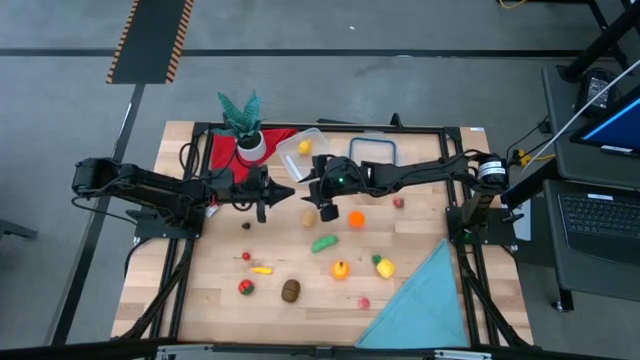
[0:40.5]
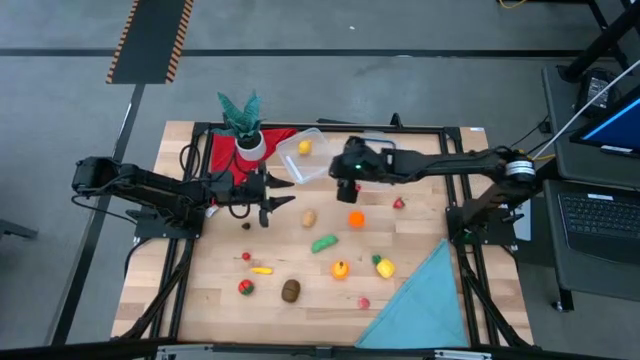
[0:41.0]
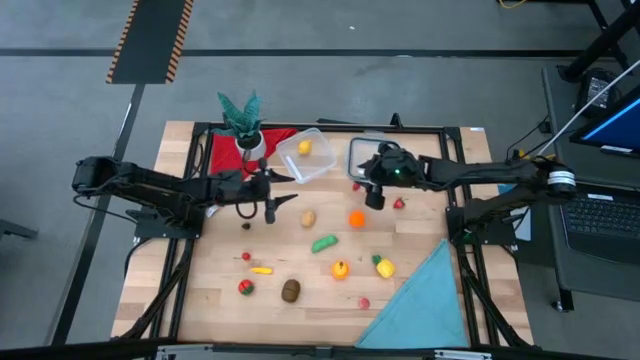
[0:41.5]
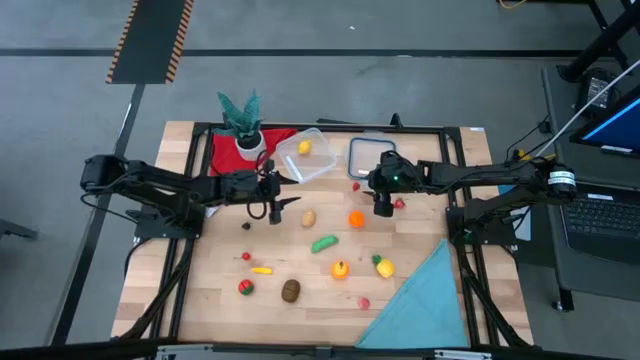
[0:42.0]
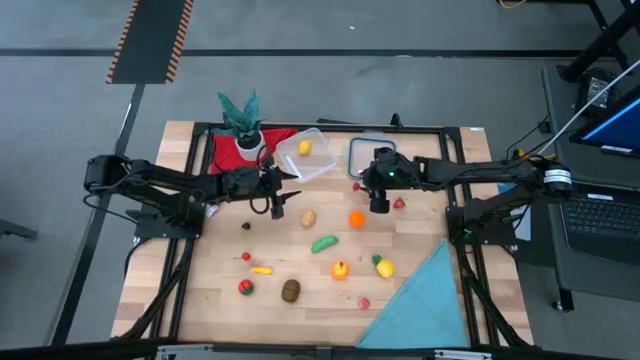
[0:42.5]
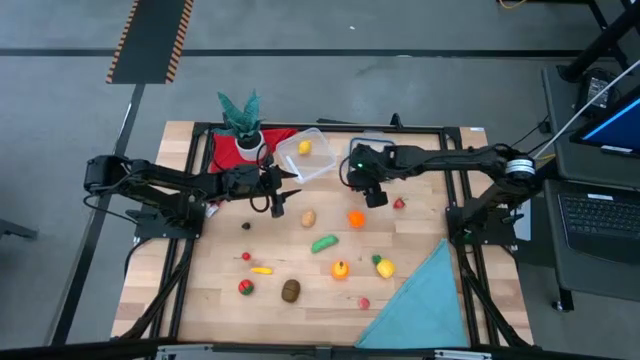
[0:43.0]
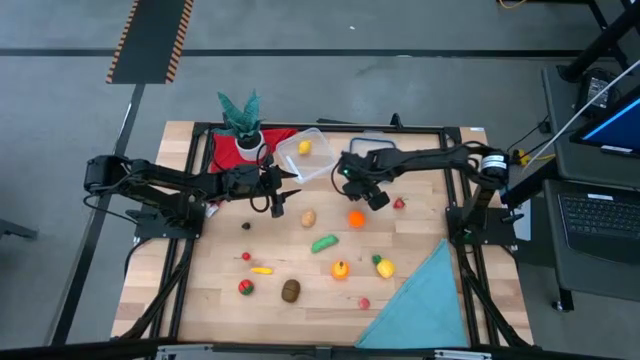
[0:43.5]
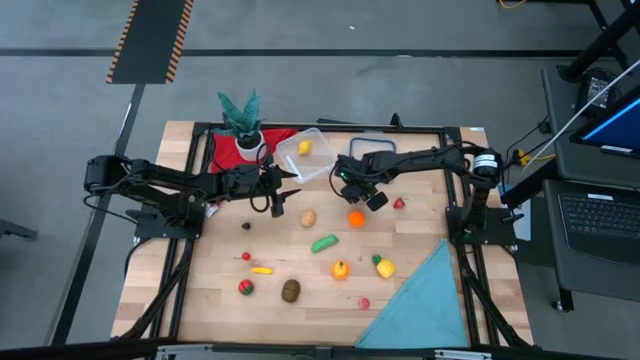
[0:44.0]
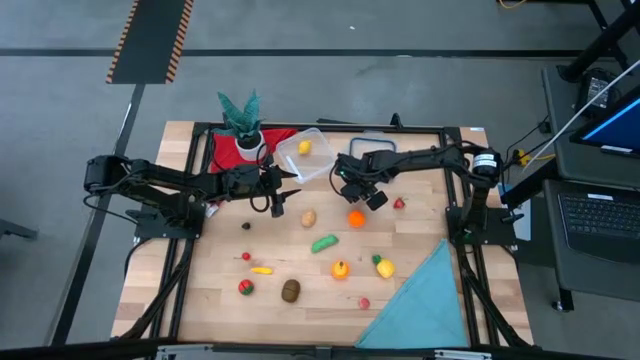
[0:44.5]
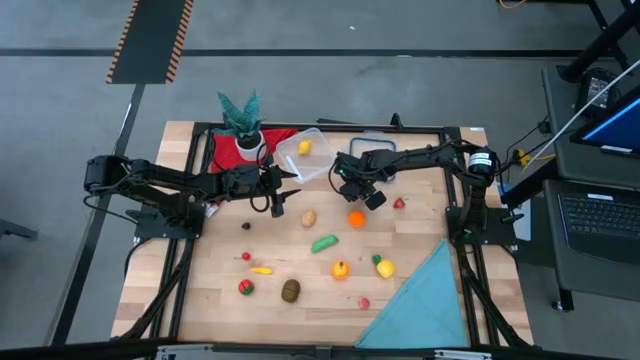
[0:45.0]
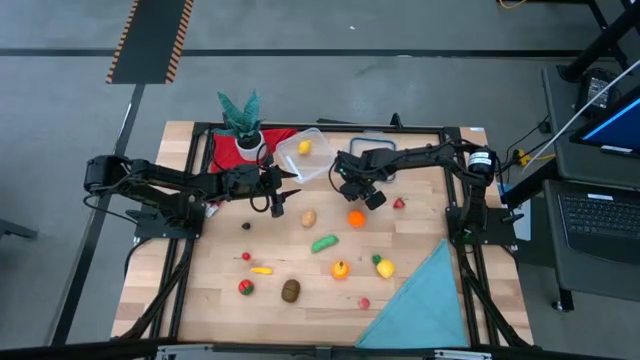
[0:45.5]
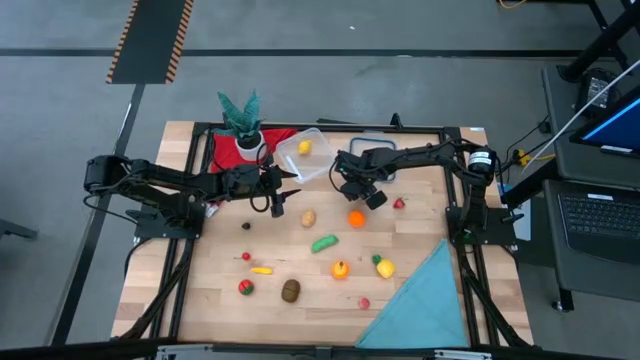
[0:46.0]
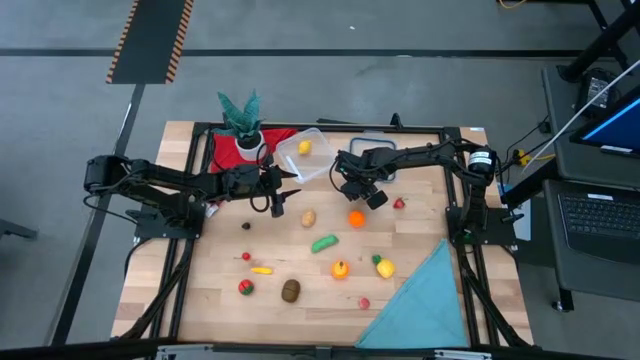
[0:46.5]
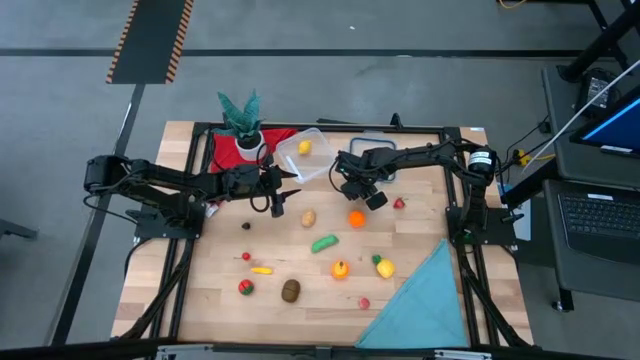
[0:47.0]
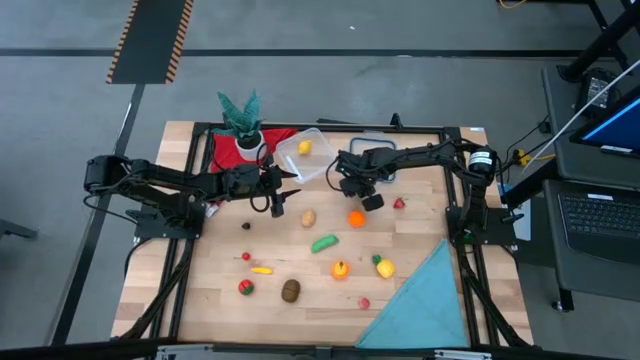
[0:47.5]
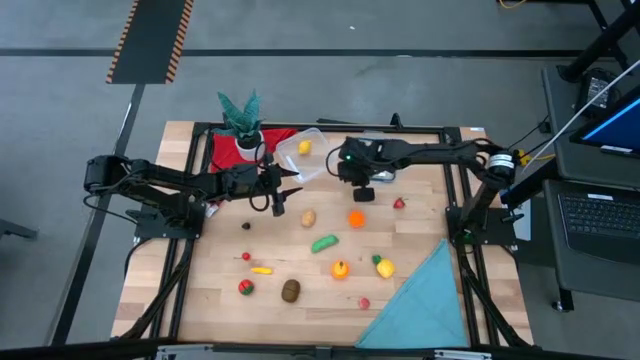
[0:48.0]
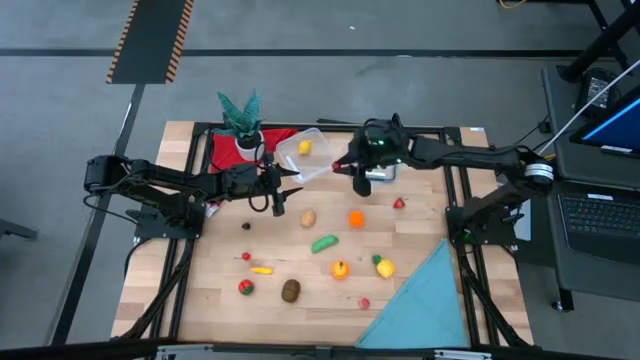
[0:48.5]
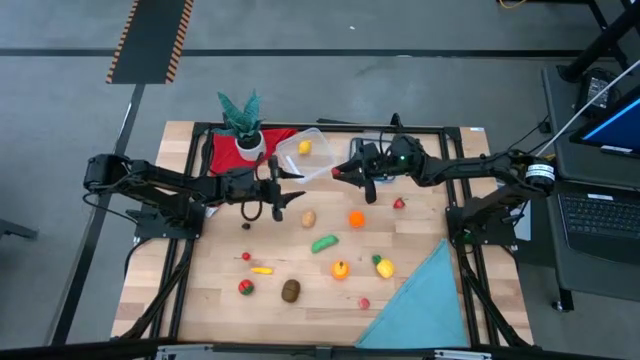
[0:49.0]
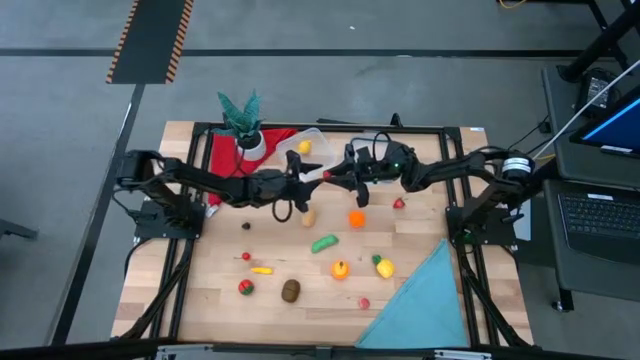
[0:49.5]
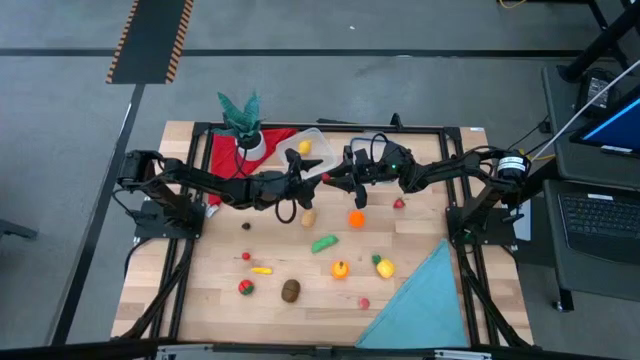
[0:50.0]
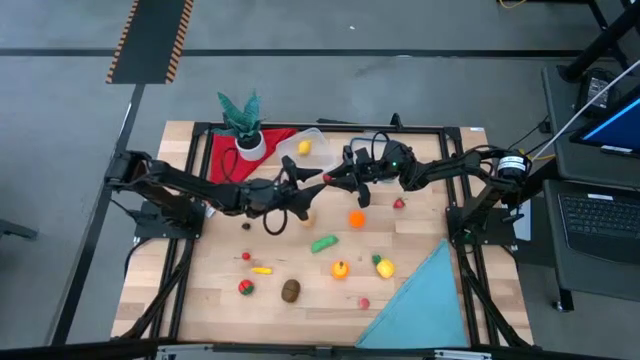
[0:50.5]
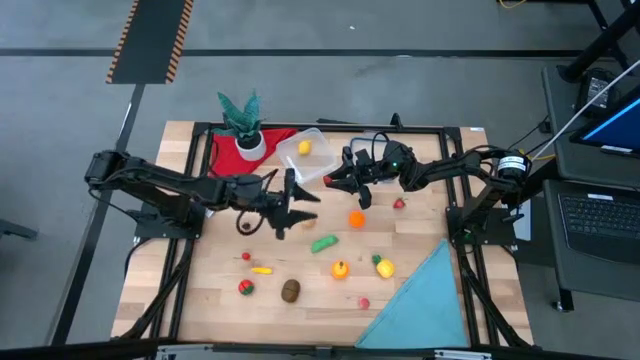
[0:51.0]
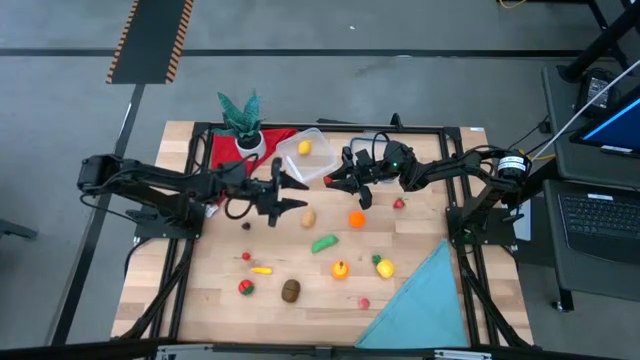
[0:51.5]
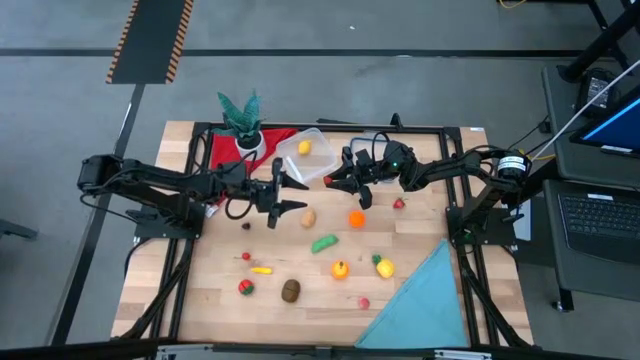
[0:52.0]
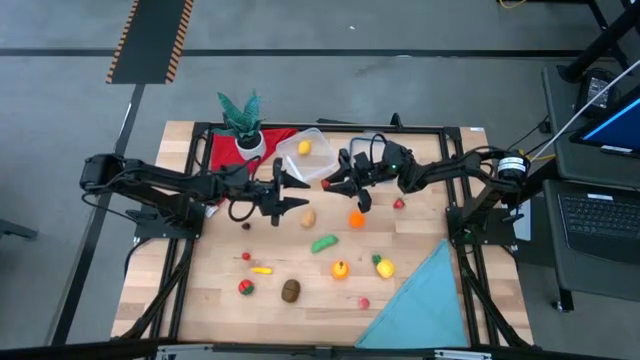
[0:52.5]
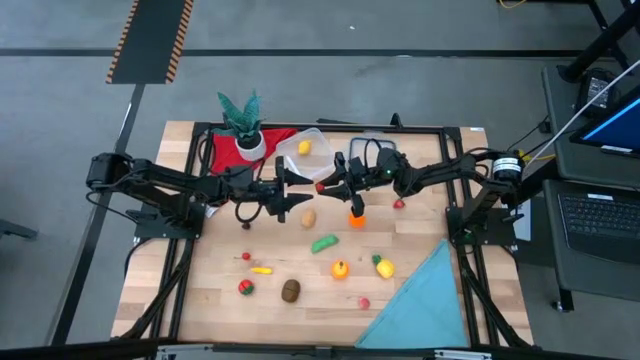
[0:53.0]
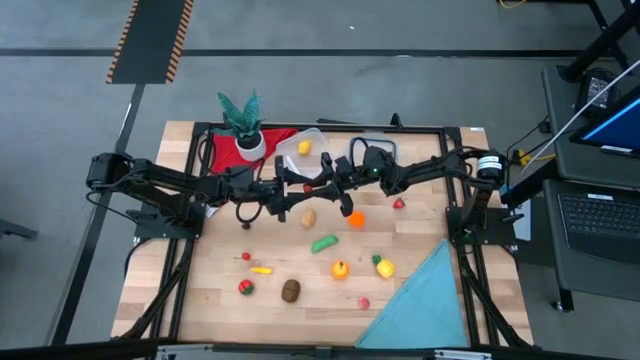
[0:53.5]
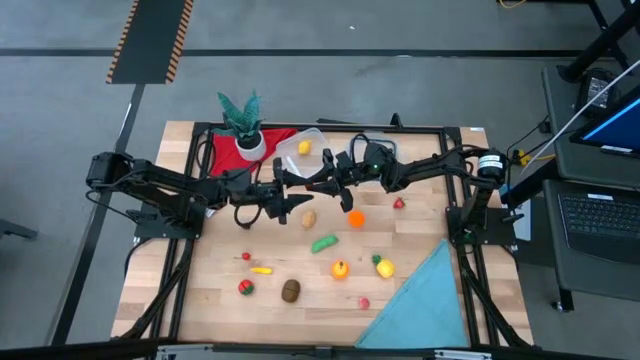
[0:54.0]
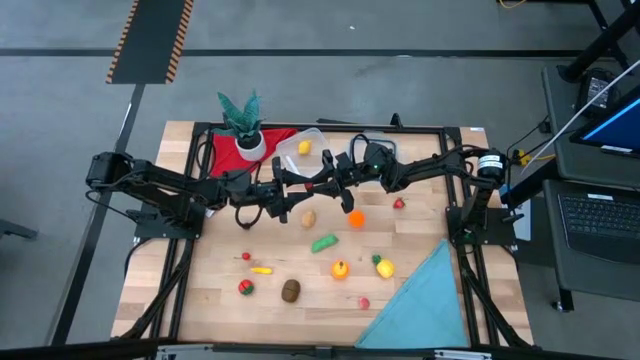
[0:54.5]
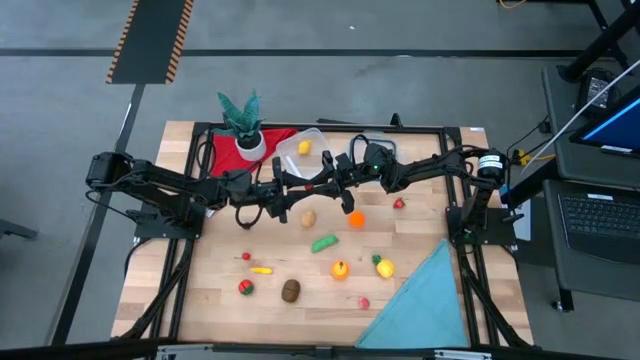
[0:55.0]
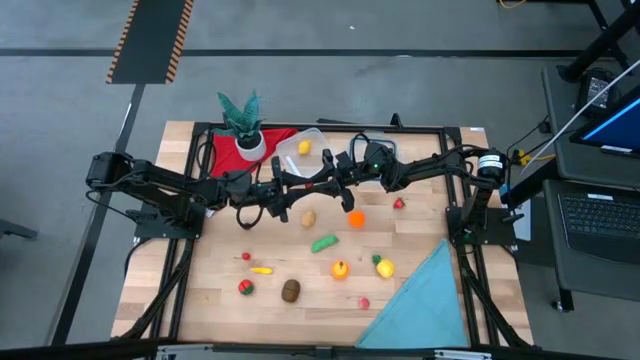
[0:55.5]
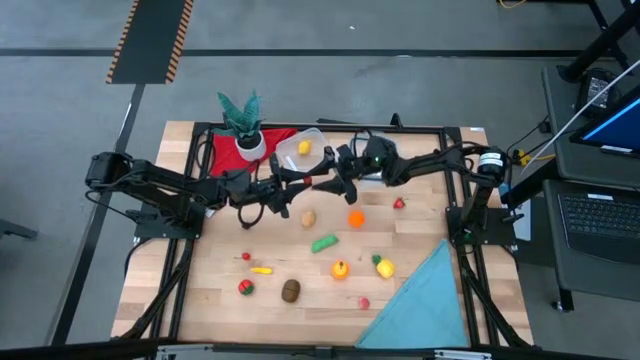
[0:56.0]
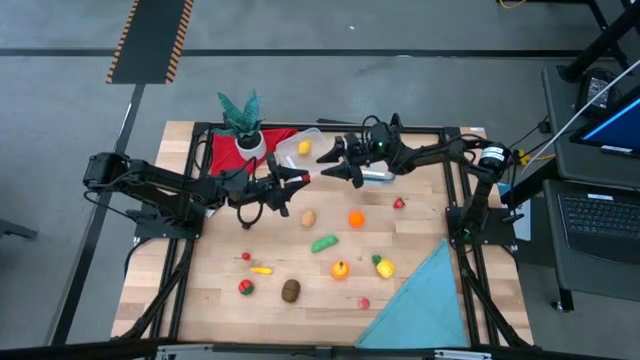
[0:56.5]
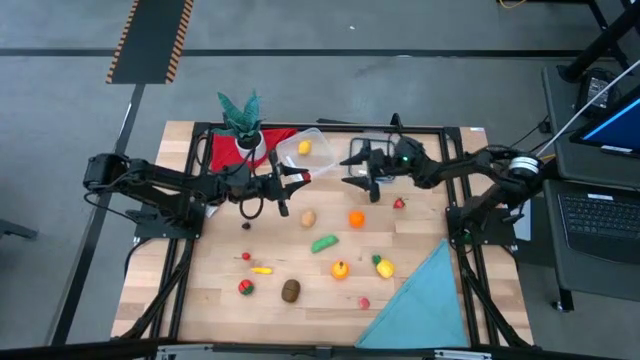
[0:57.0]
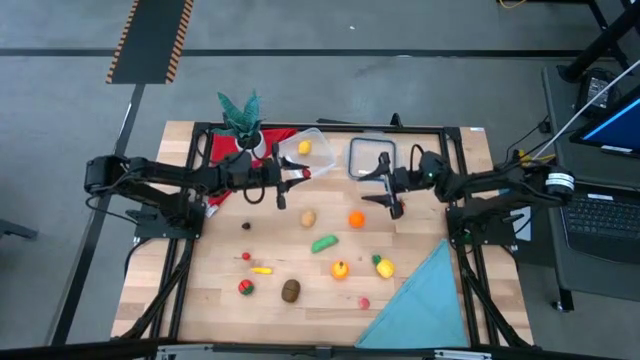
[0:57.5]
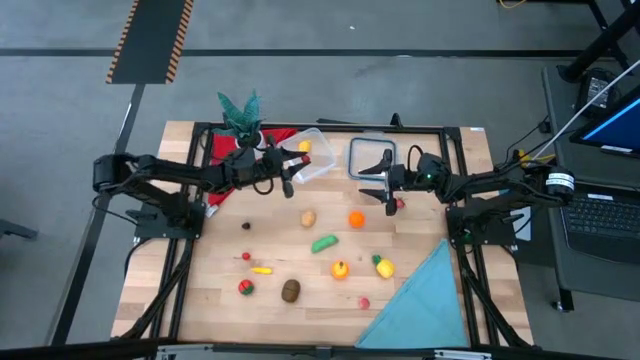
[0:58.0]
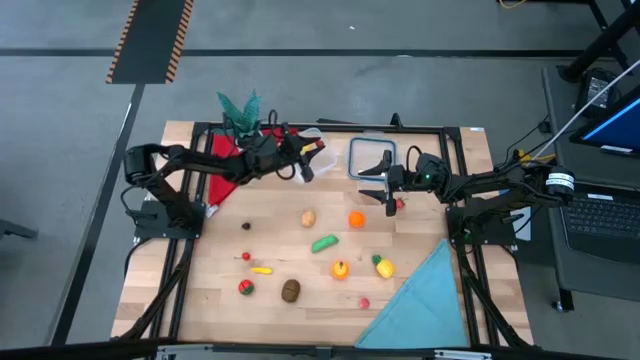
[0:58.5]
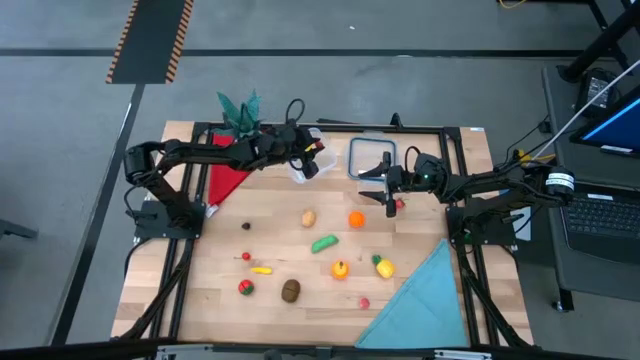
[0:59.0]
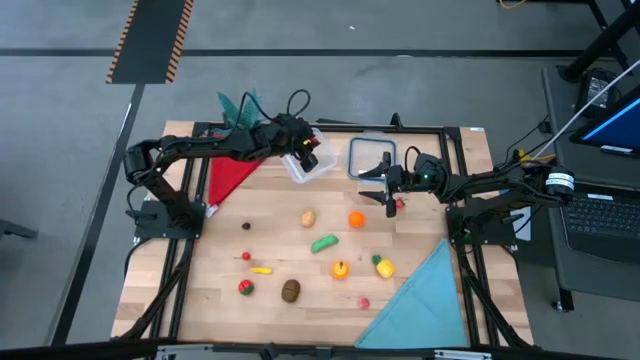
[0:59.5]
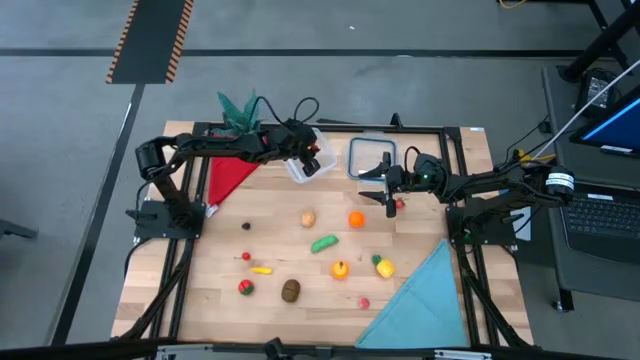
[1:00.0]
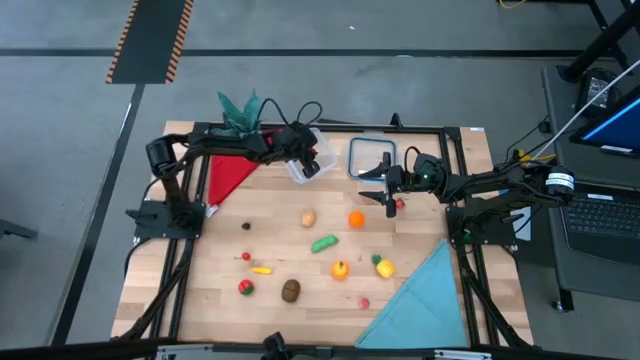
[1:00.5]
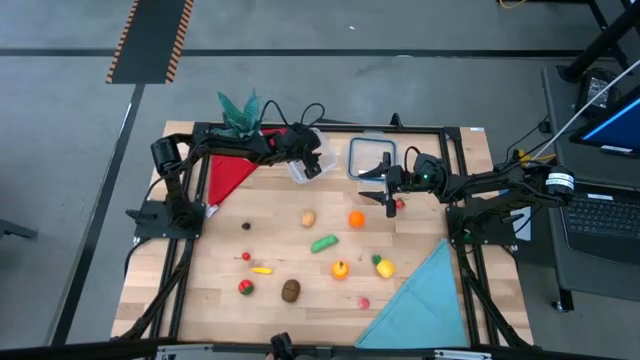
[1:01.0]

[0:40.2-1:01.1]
Task: Pick and placing Produce into tupperware
Put the raspberry into the transparent bin
